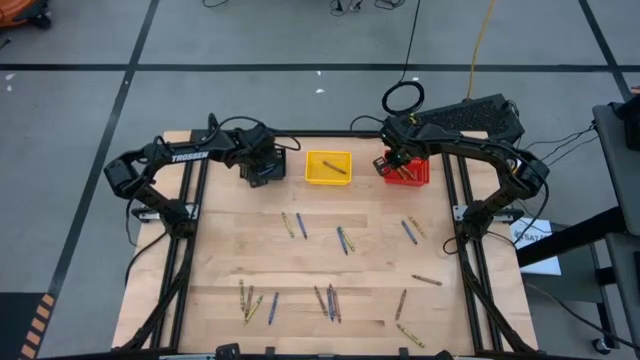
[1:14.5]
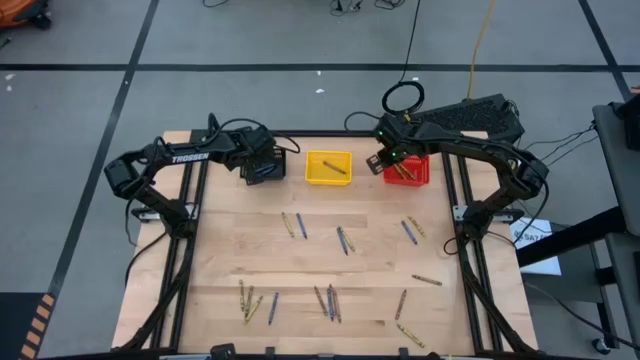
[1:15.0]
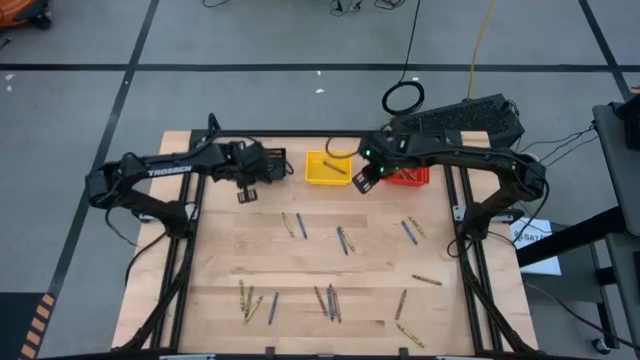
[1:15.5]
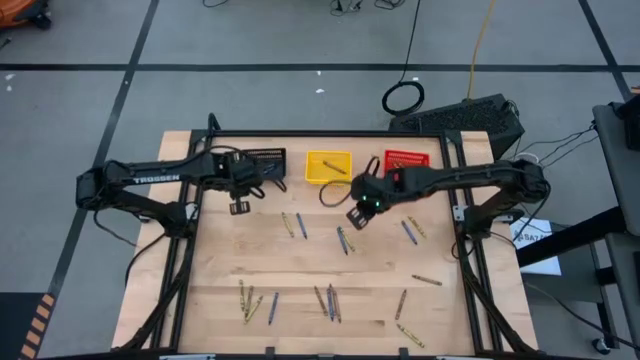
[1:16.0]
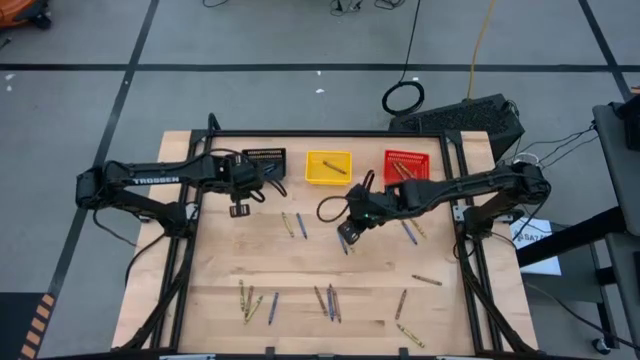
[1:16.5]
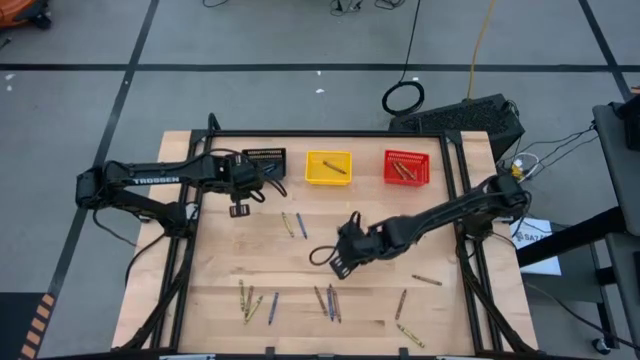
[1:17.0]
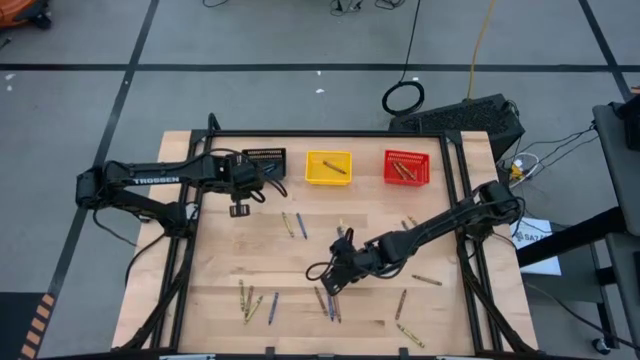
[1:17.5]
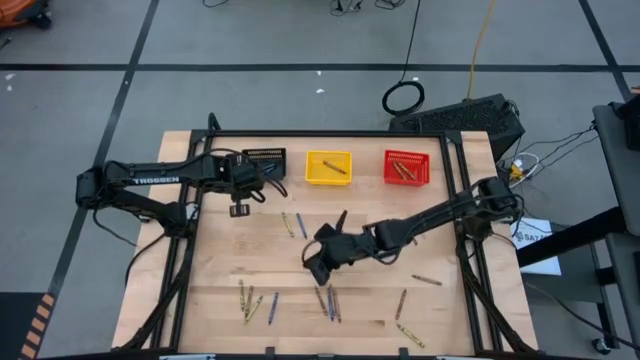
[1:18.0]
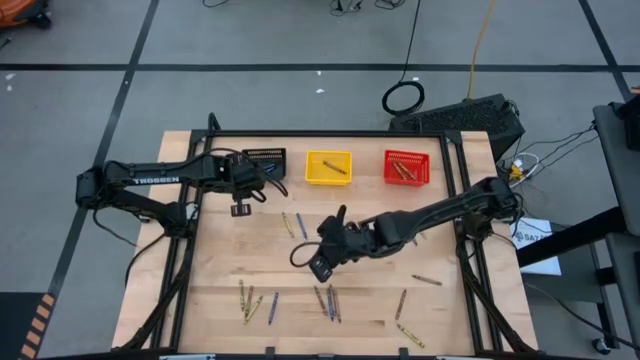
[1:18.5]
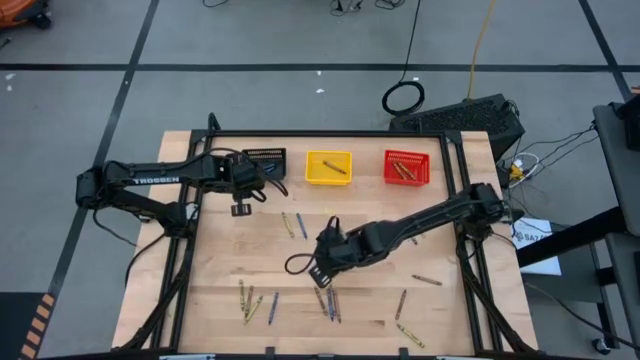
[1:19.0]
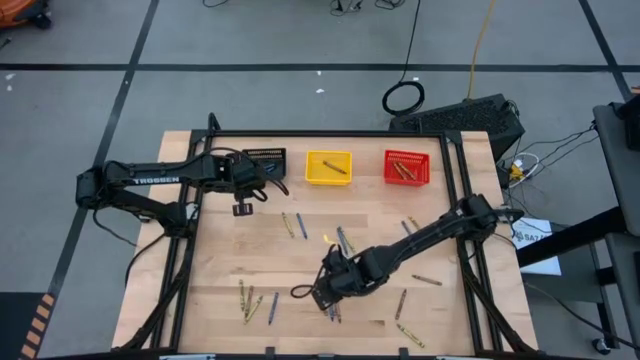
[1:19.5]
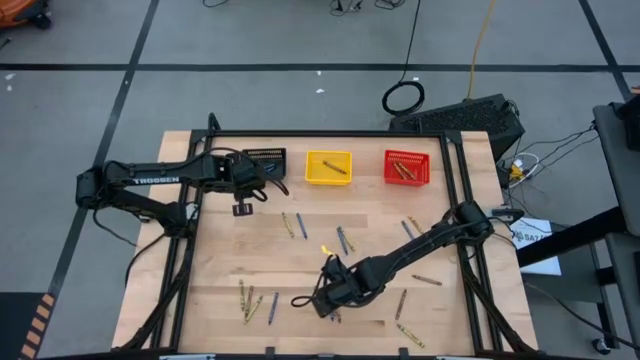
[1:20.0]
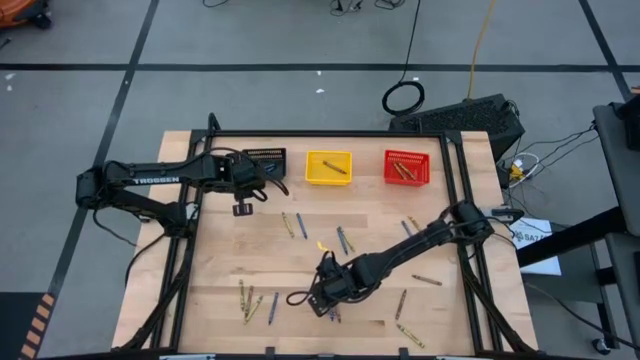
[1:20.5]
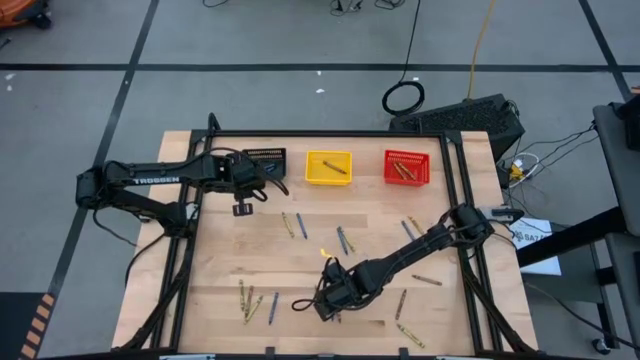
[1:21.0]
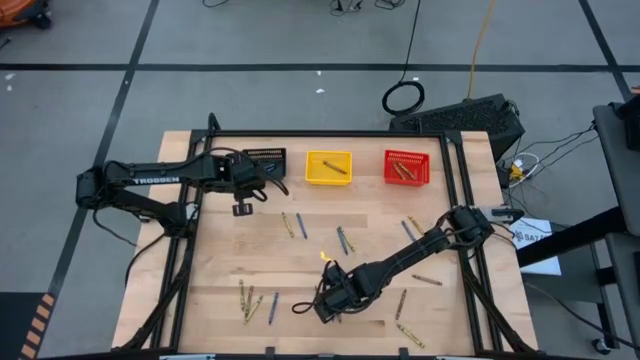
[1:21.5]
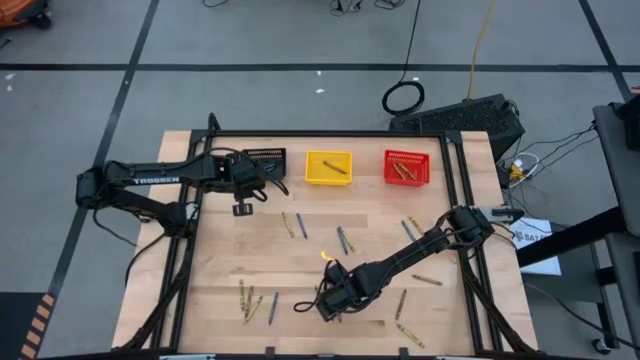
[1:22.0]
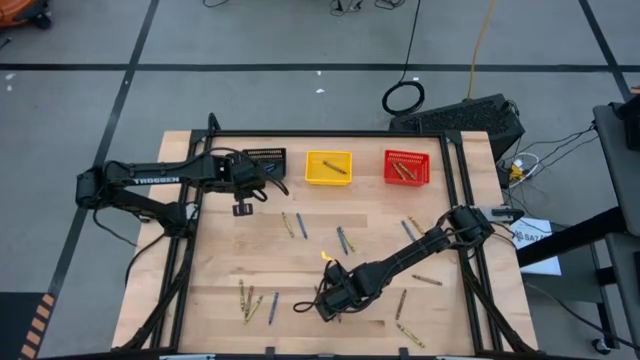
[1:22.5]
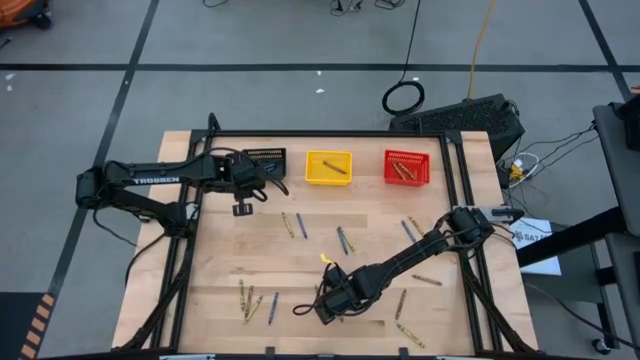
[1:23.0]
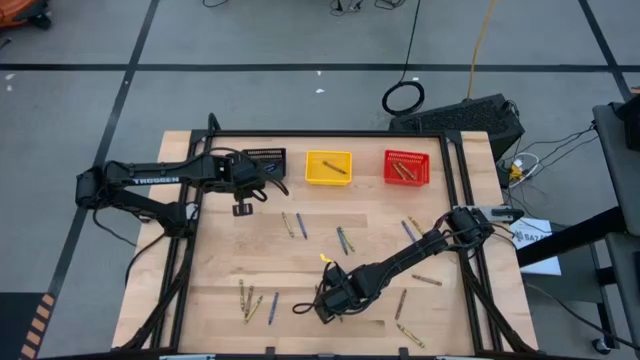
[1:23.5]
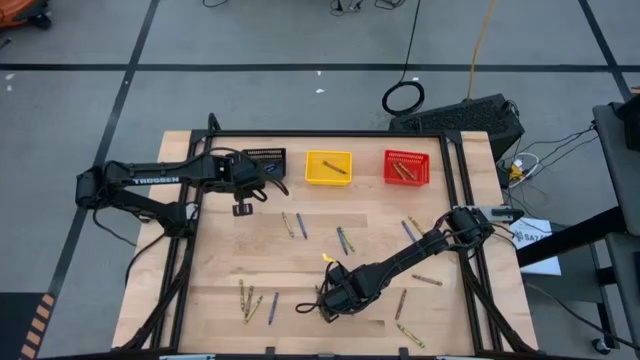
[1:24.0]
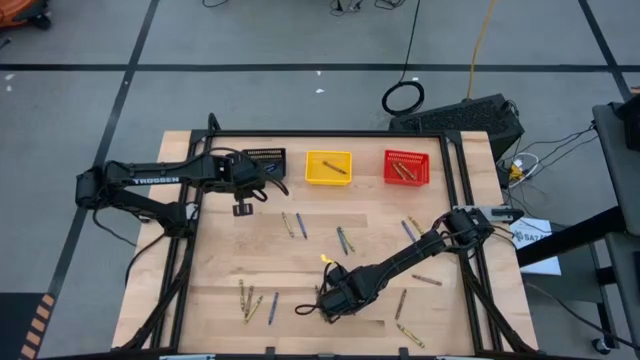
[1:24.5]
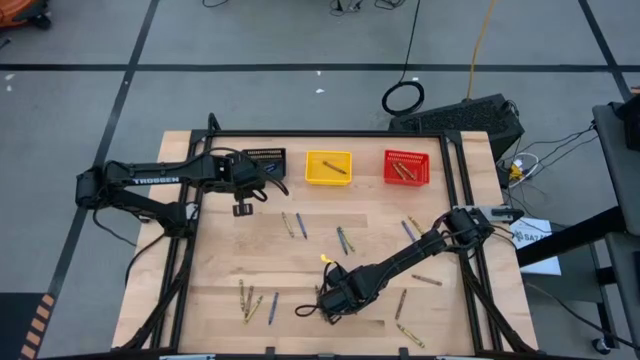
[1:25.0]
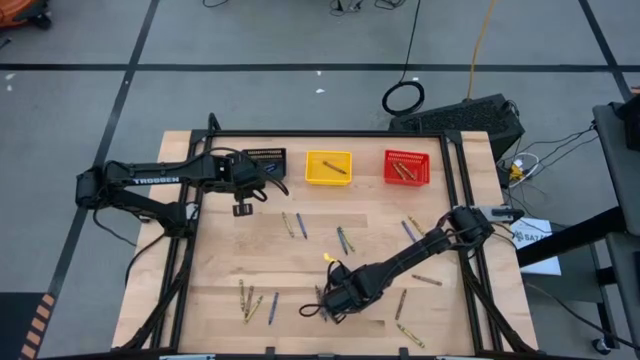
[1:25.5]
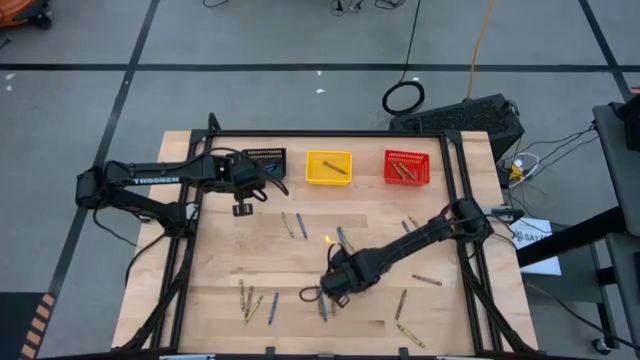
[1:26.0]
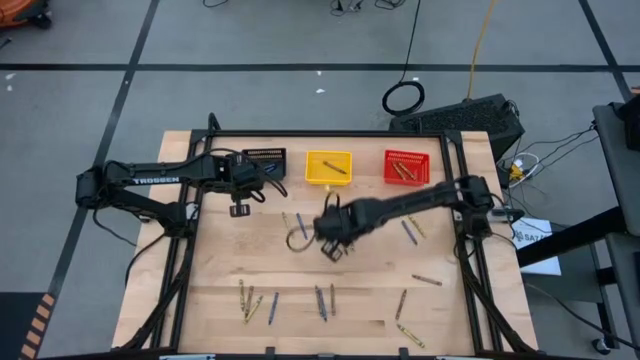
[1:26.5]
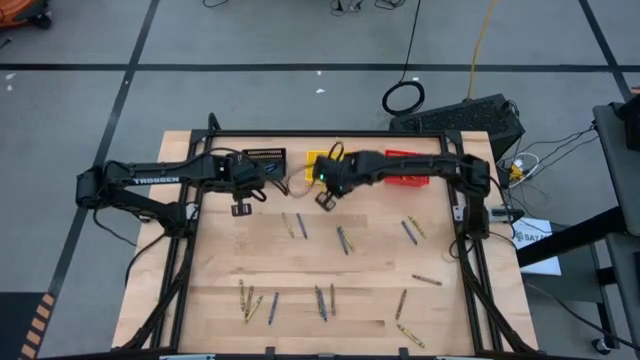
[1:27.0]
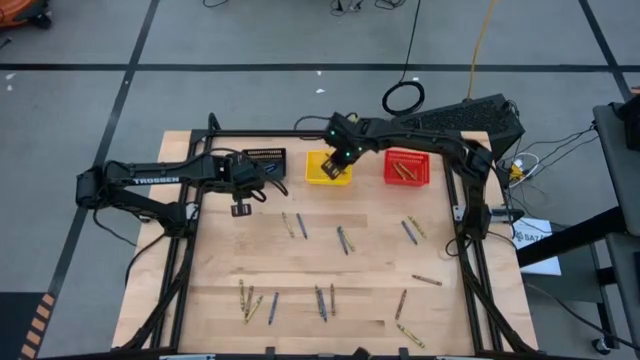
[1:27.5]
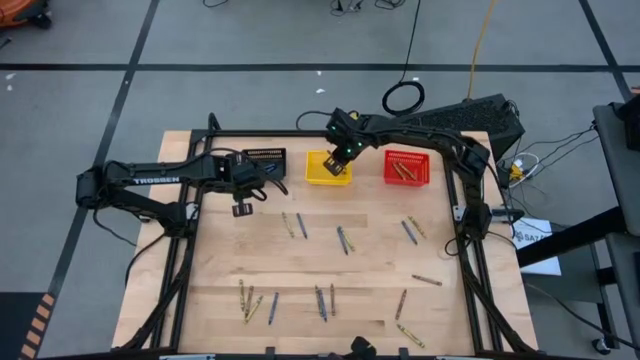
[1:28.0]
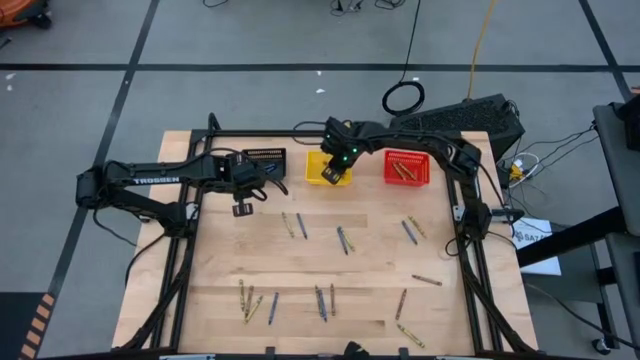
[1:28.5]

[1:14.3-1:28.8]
Task: Sort crayons
Put the brown crayon into the yellow bin

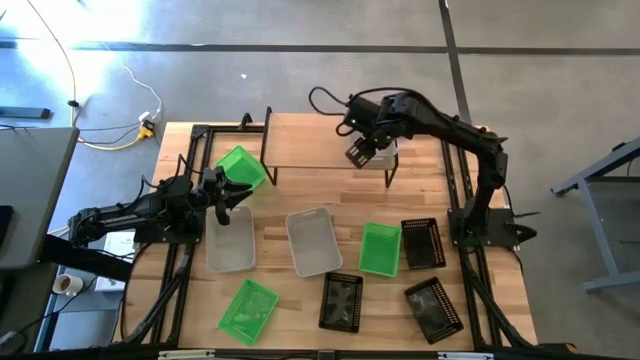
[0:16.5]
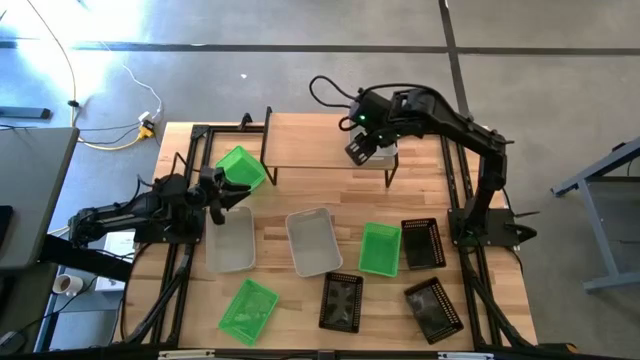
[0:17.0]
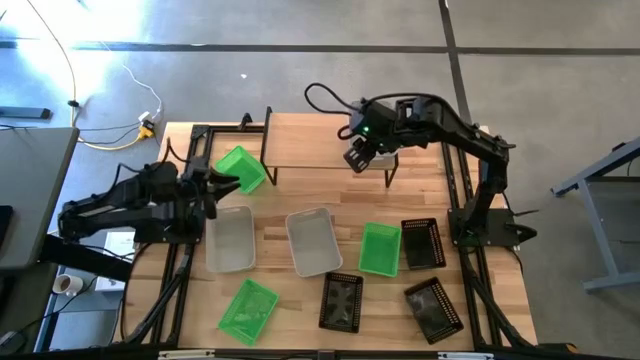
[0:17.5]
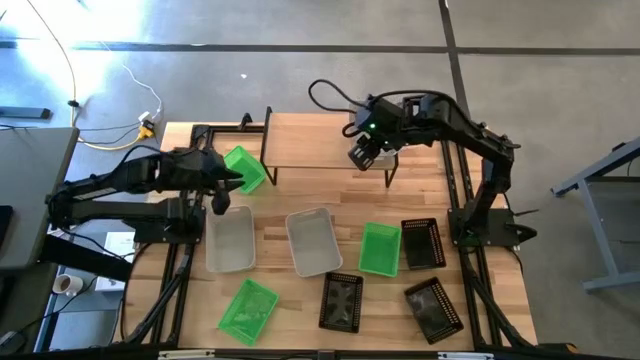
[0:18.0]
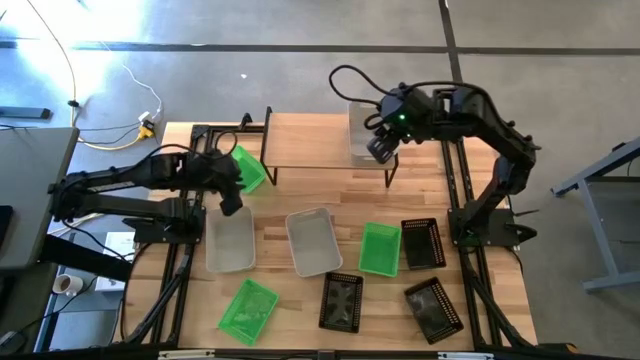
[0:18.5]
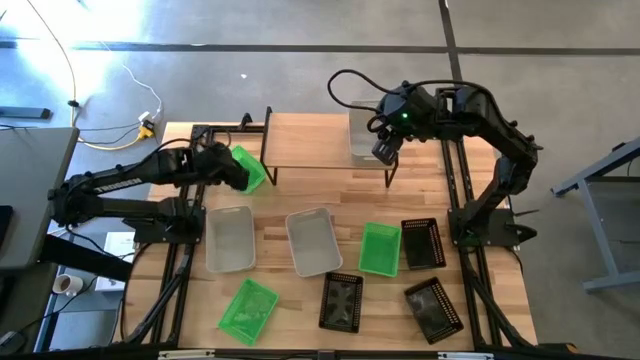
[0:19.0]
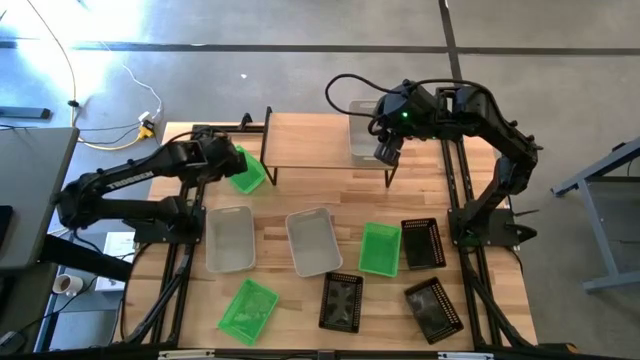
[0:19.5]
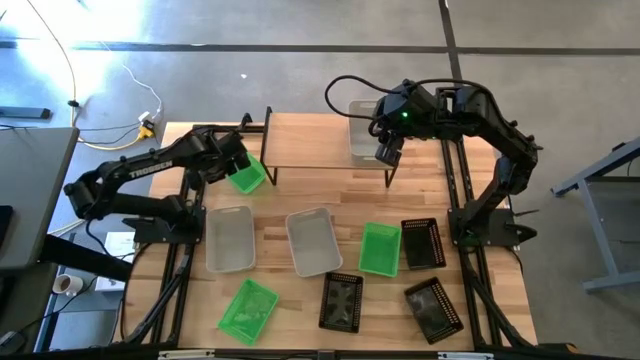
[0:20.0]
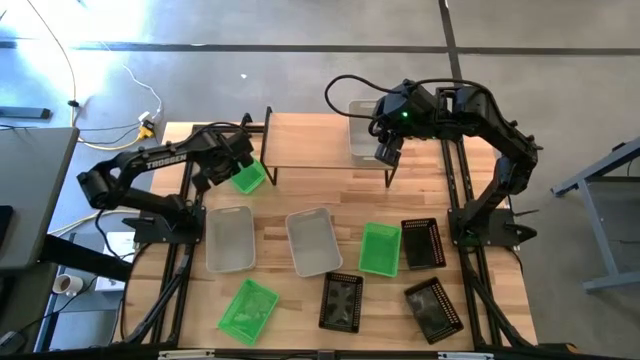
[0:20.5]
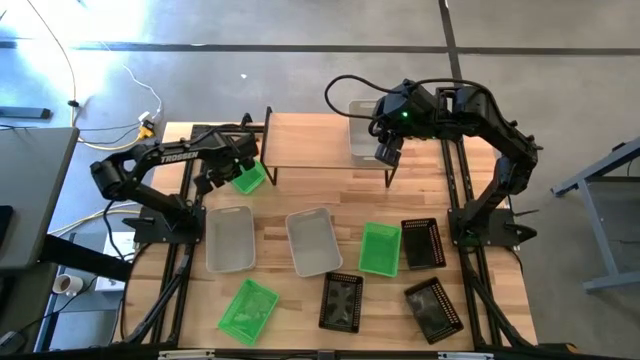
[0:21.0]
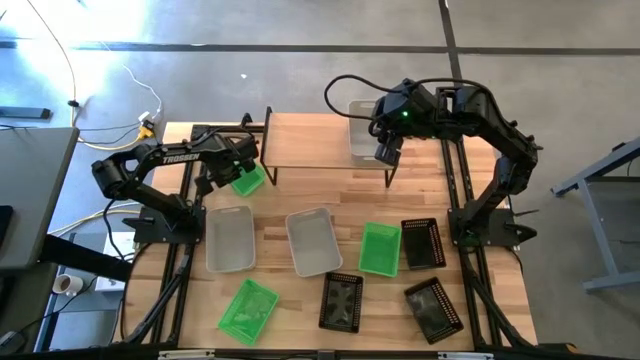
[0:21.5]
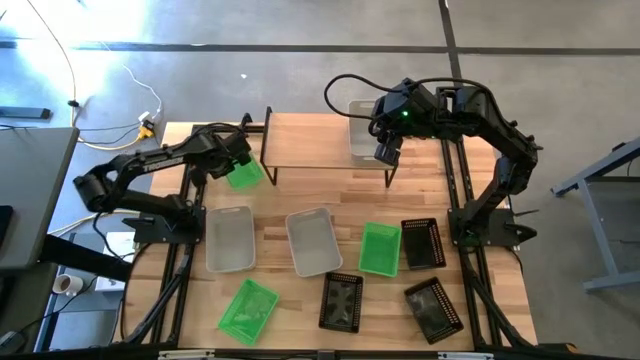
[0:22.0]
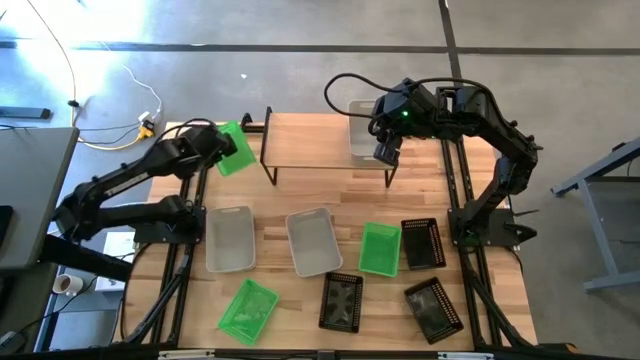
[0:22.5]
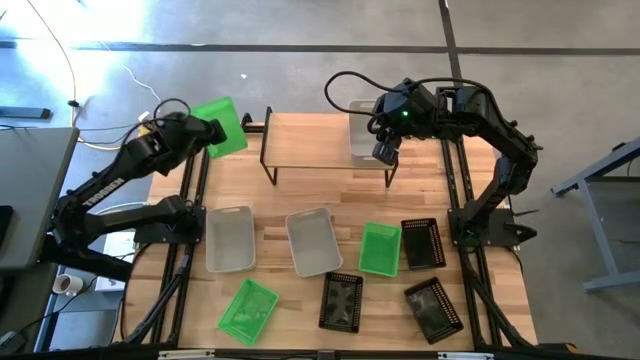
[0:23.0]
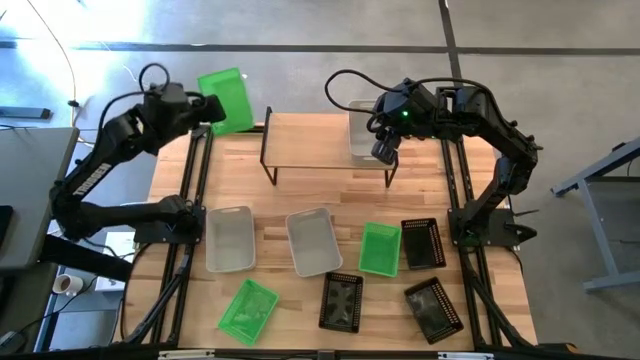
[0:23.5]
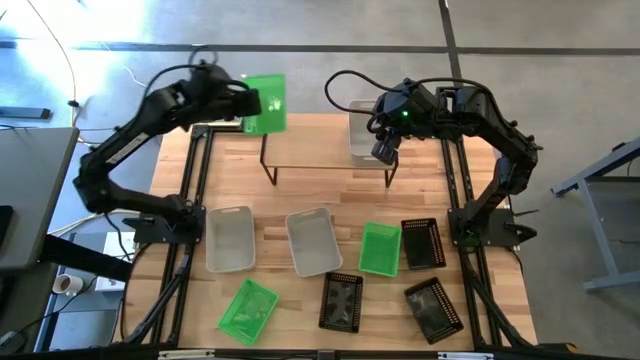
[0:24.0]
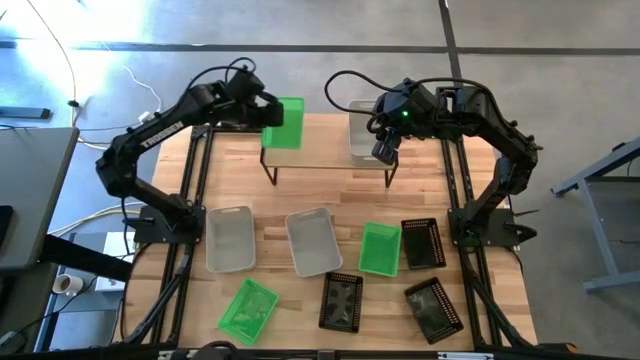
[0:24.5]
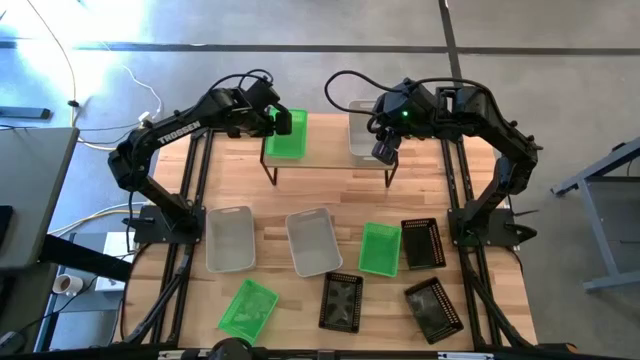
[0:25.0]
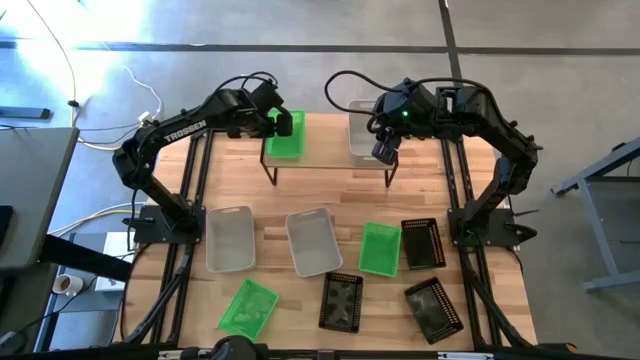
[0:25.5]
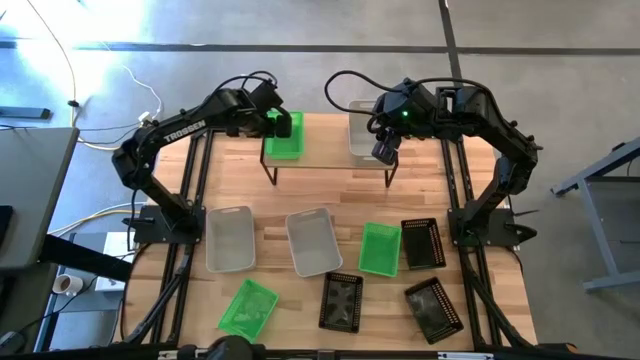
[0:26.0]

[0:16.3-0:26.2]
Task: Stack baskets on shelf by color
Put the top green bin on the shelf
